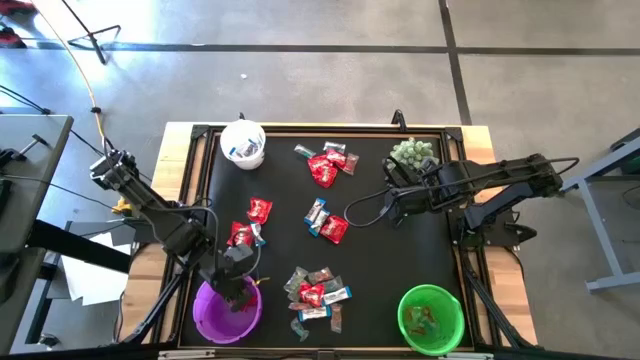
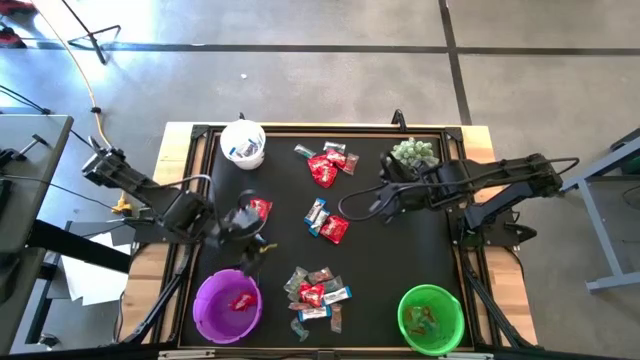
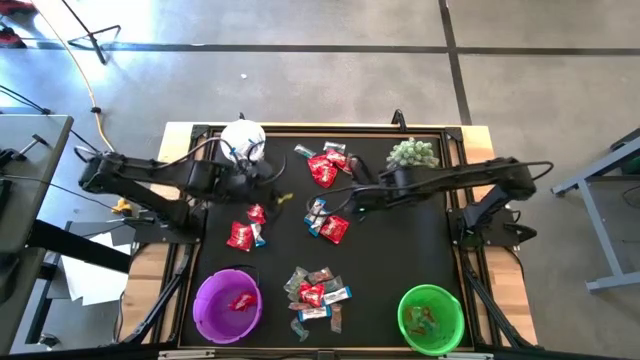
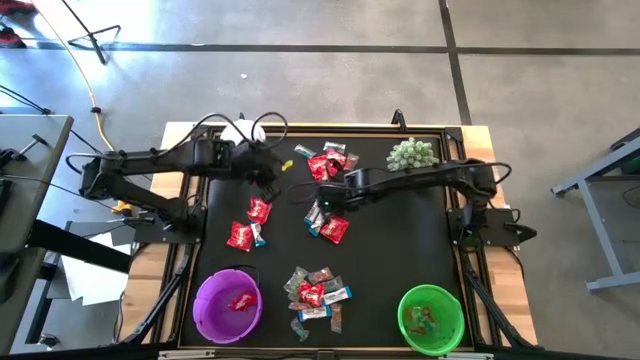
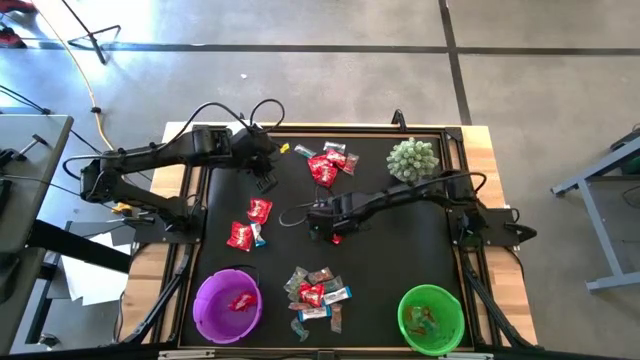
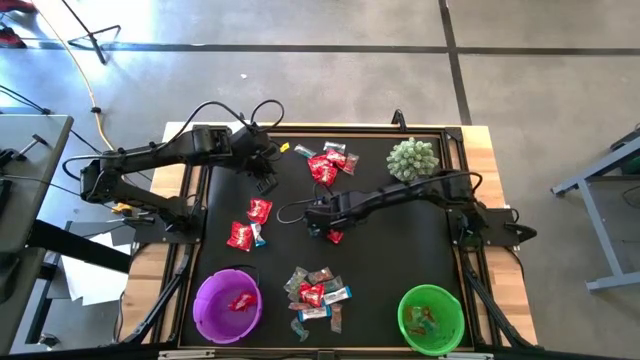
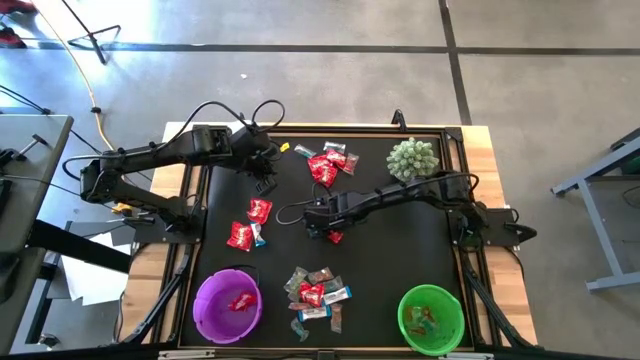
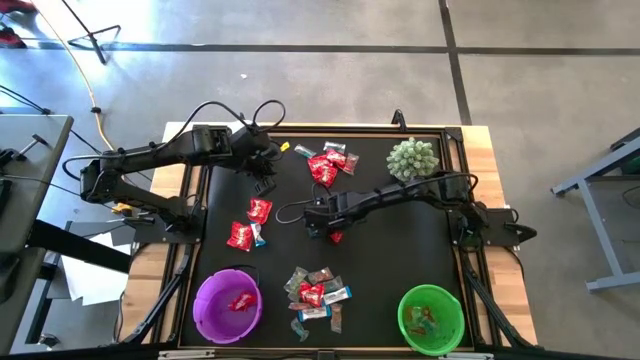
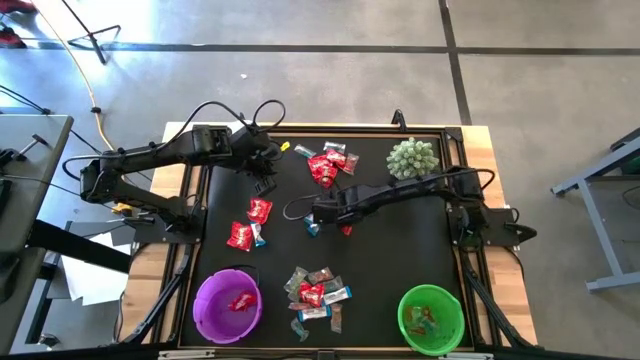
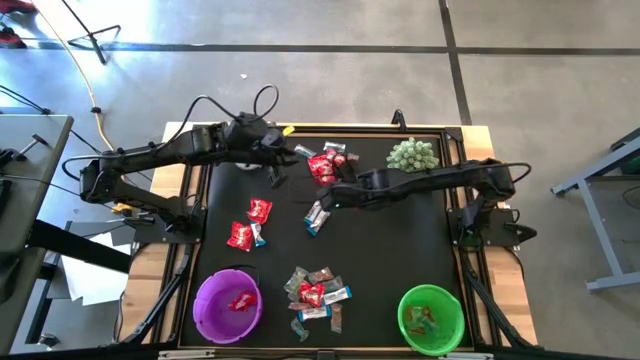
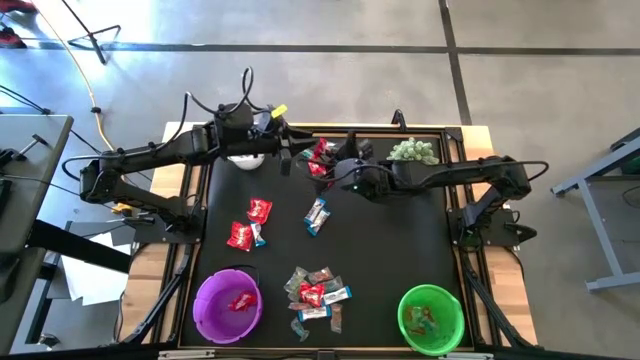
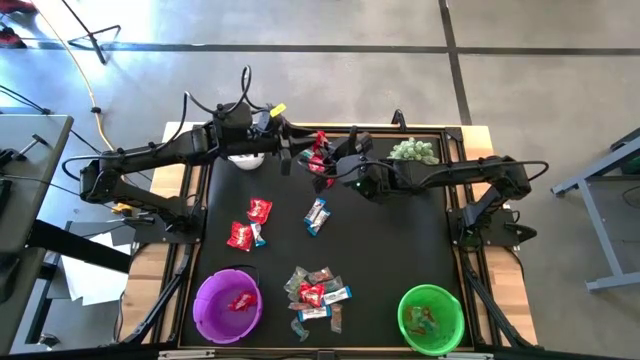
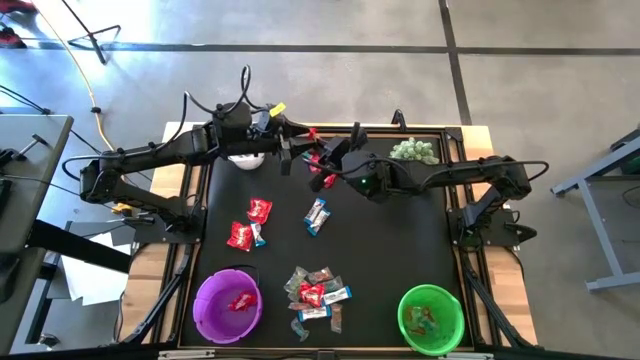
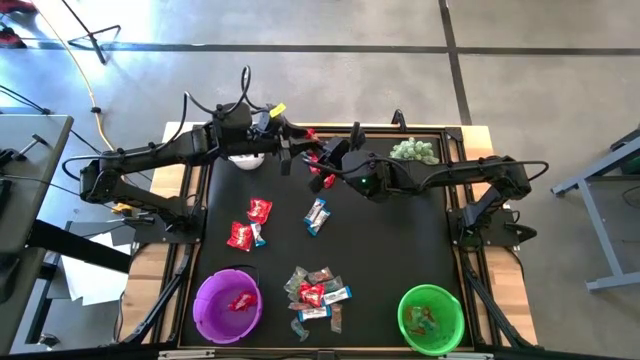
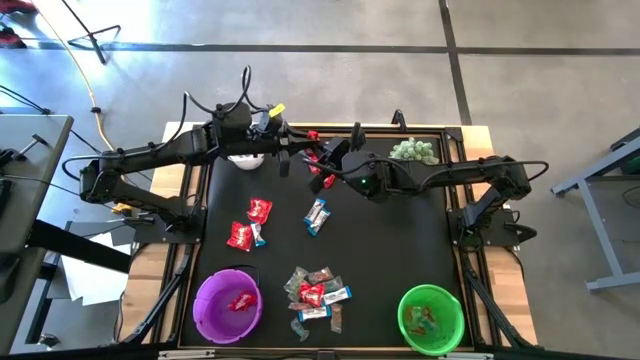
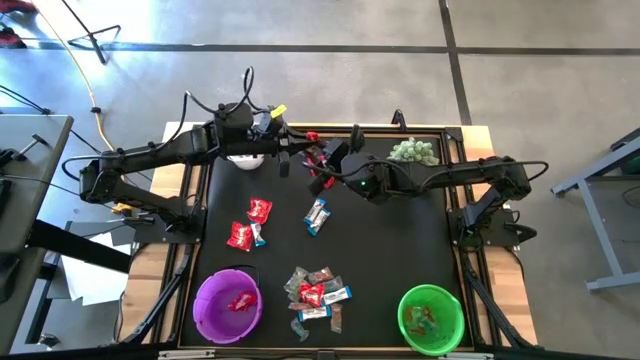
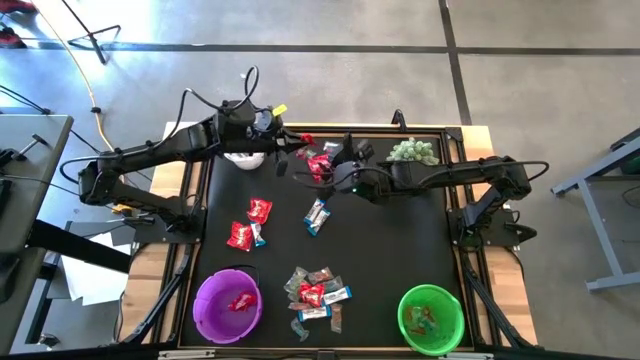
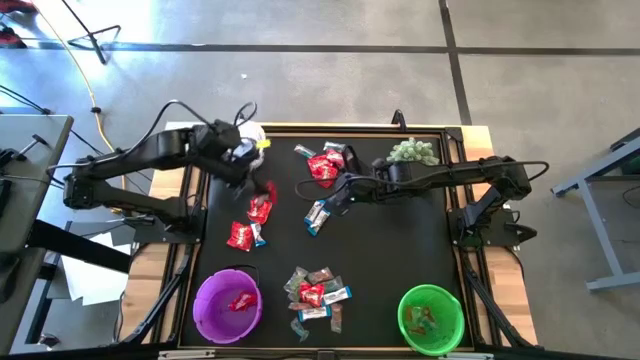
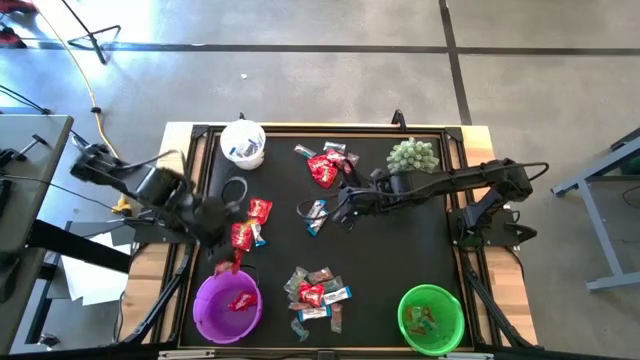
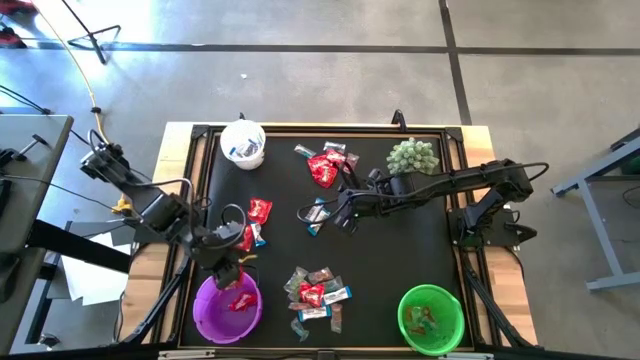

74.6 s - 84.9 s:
Task: Sort candy
Put the red candy into the violet bucket

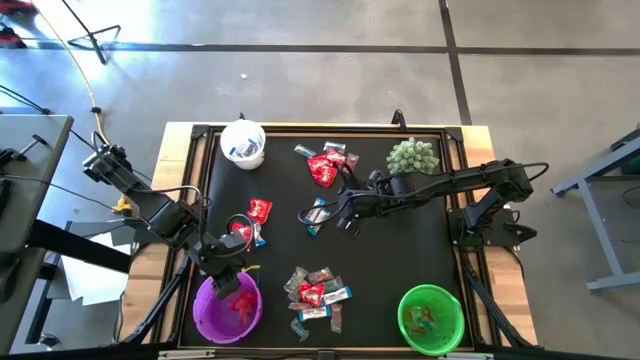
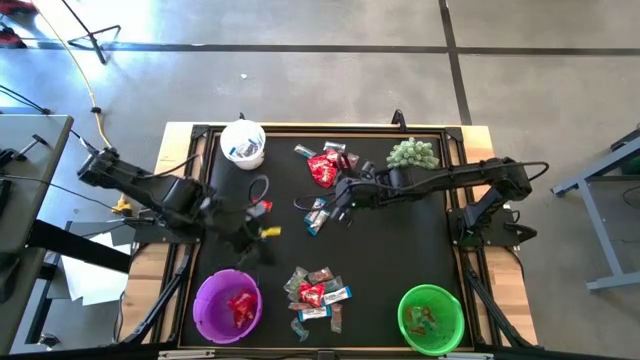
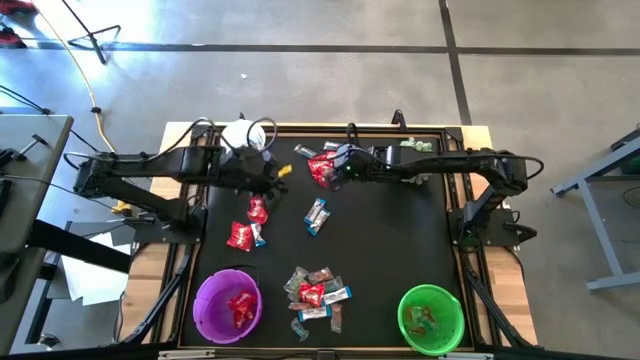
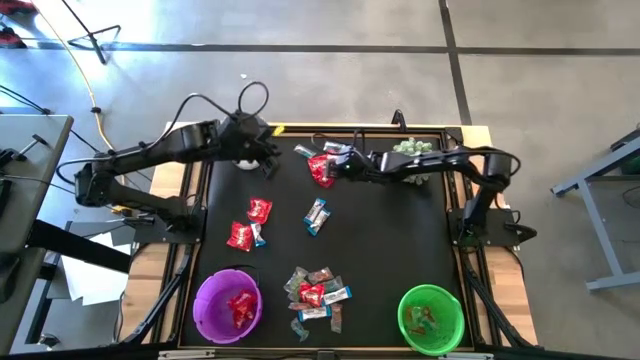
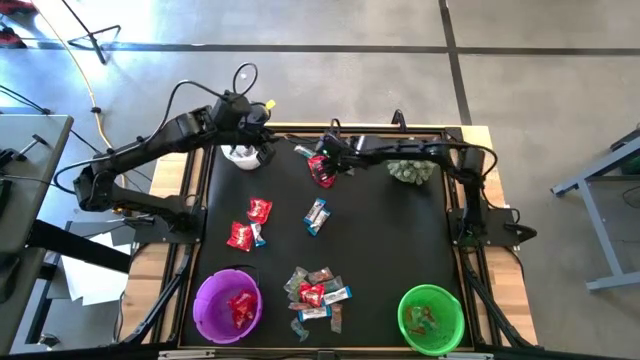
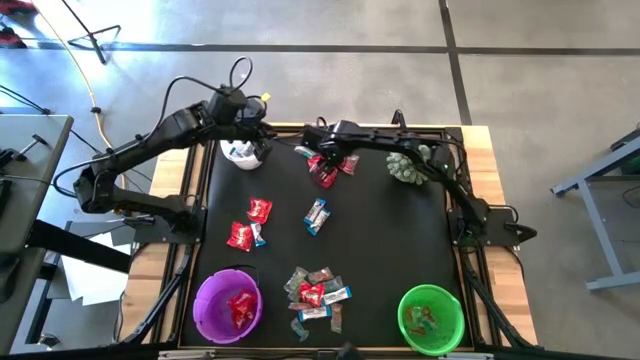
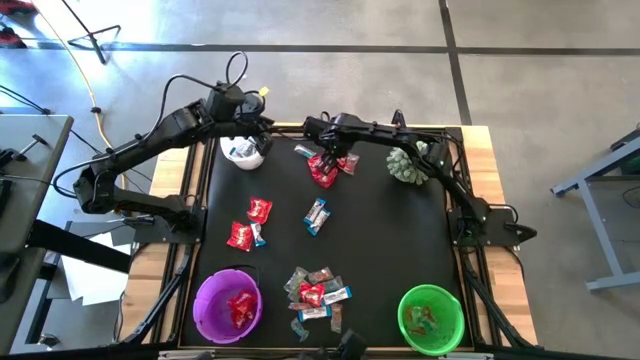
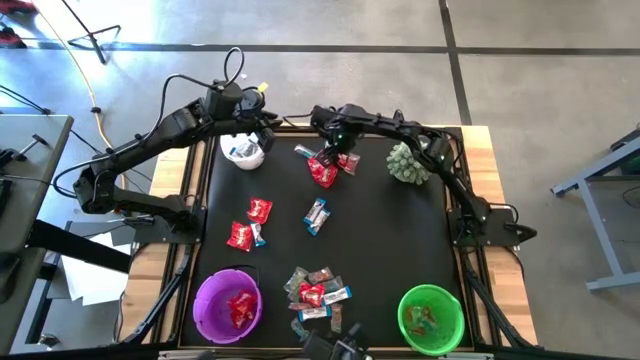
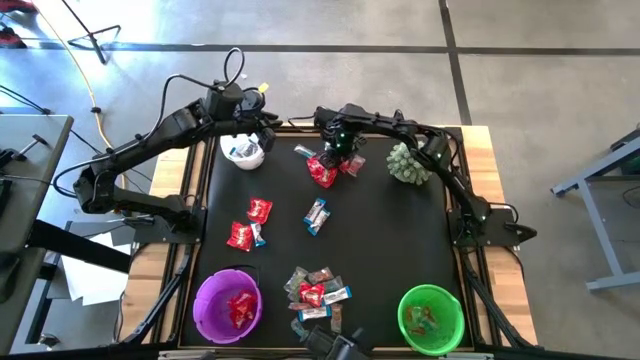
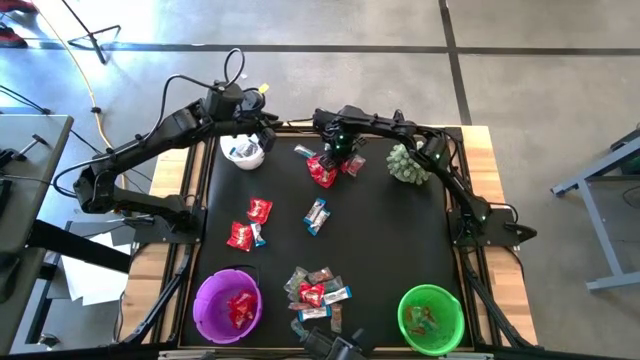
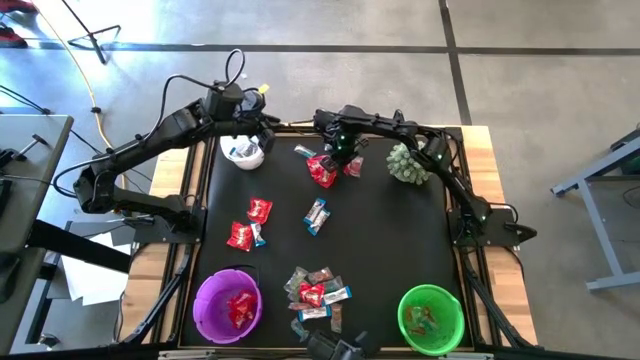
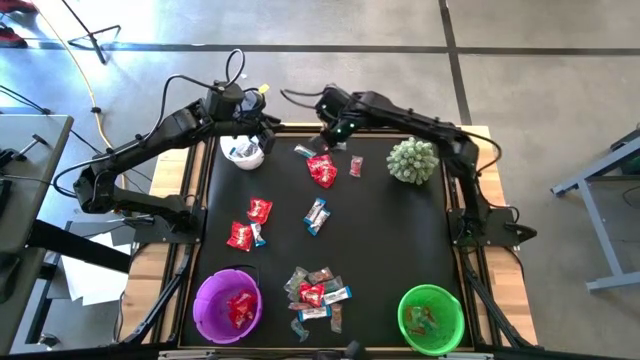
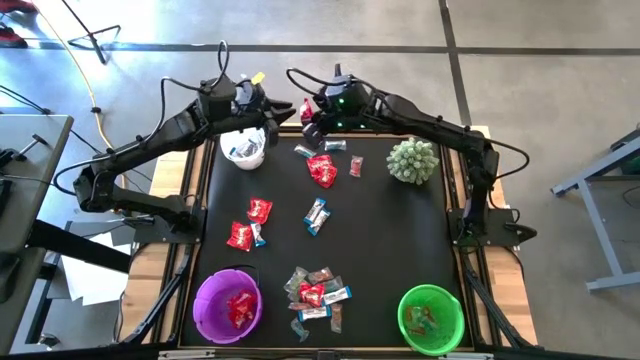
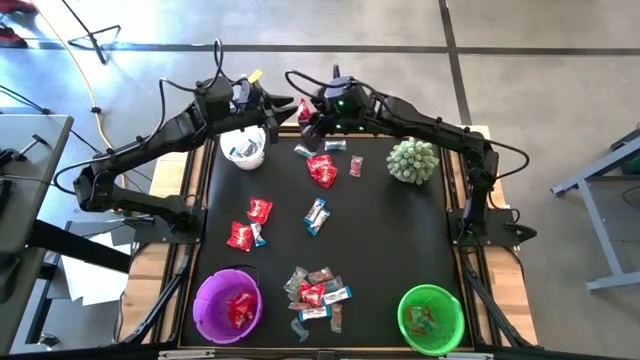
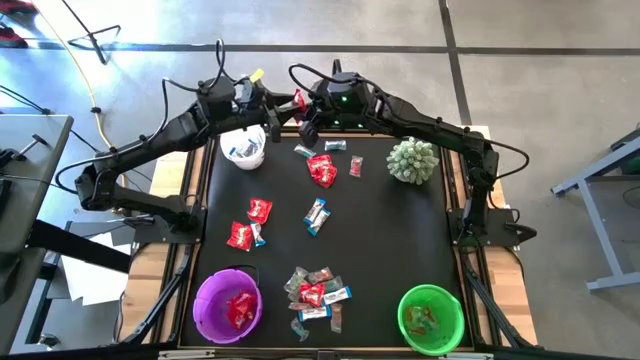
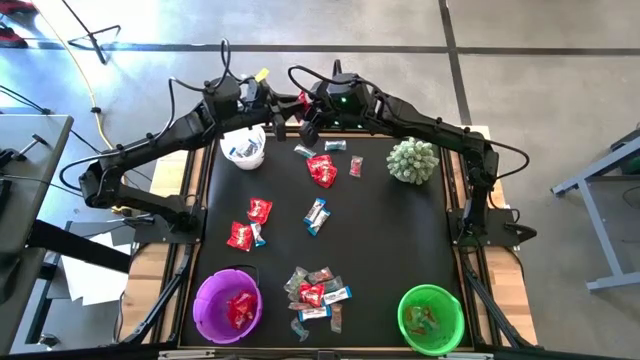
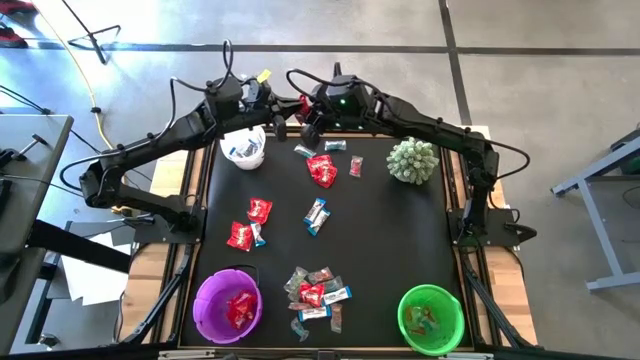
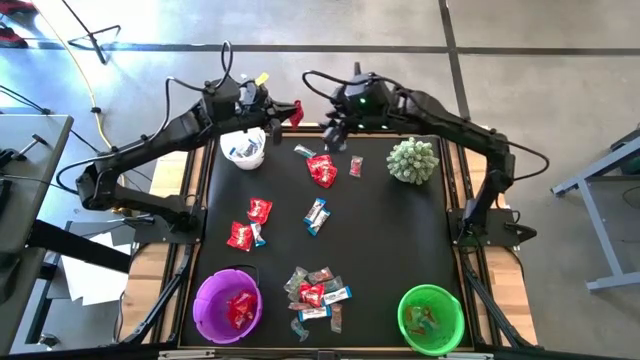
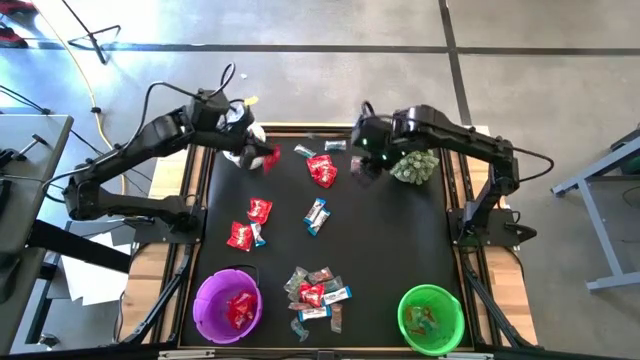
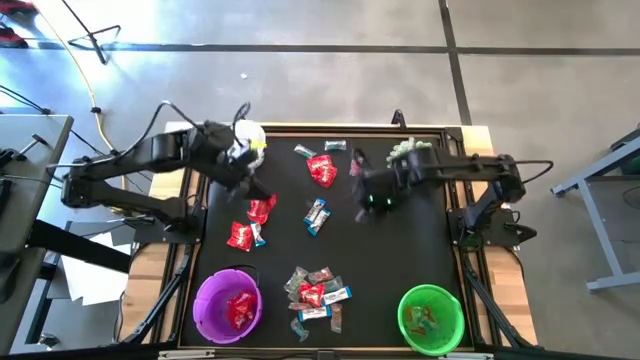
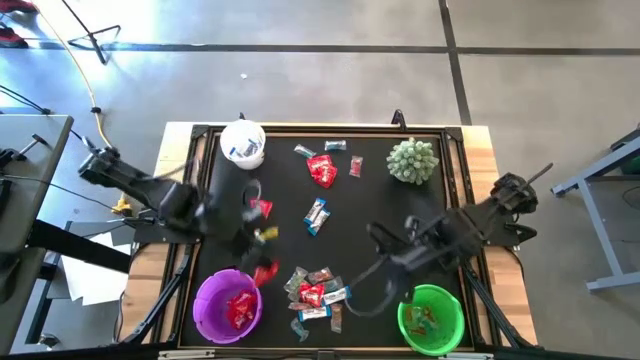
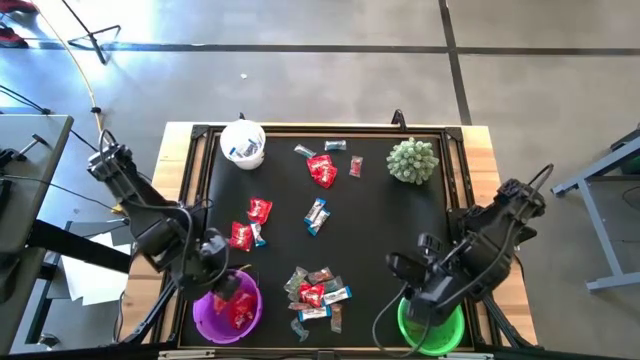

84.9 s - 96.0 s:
Put the red candy into the violet bucket
